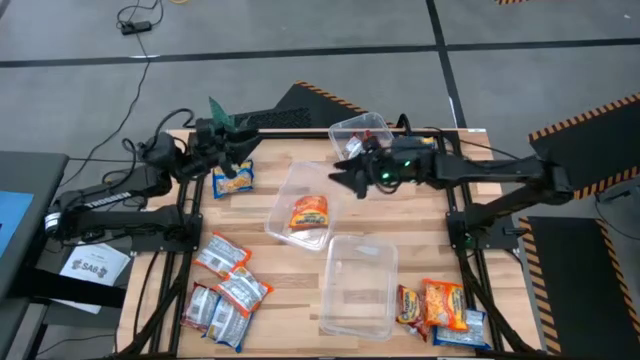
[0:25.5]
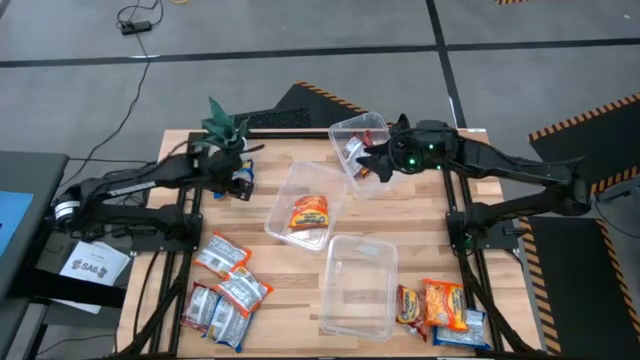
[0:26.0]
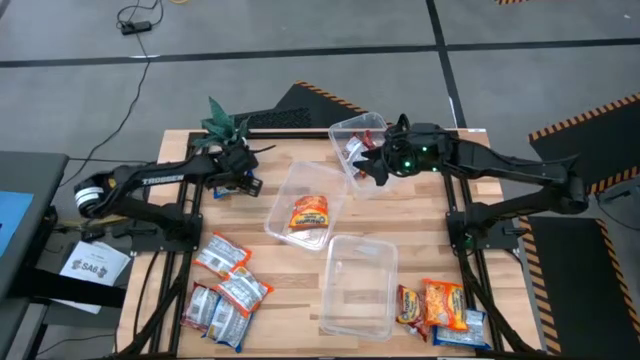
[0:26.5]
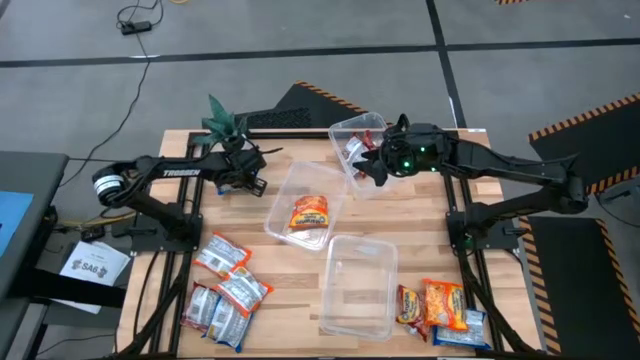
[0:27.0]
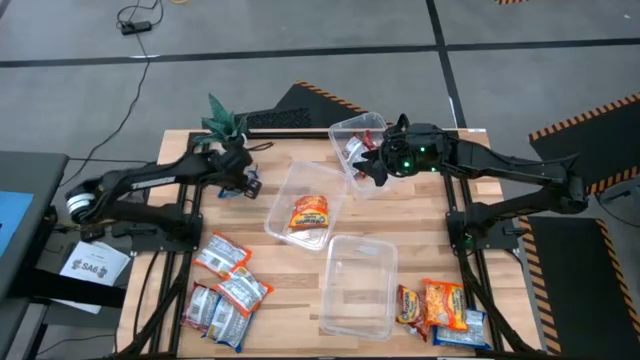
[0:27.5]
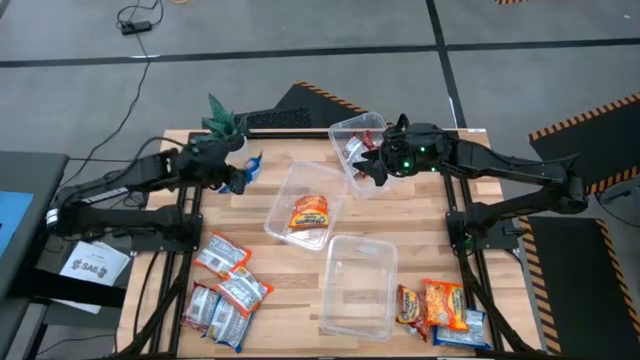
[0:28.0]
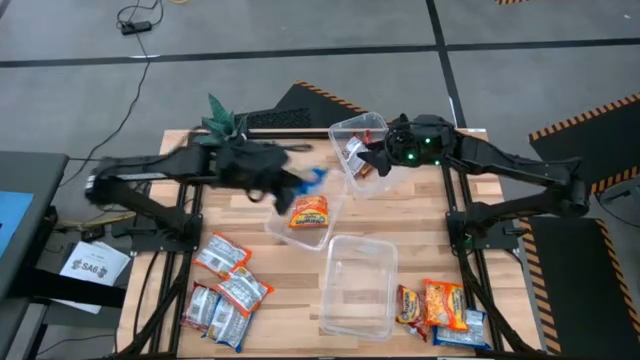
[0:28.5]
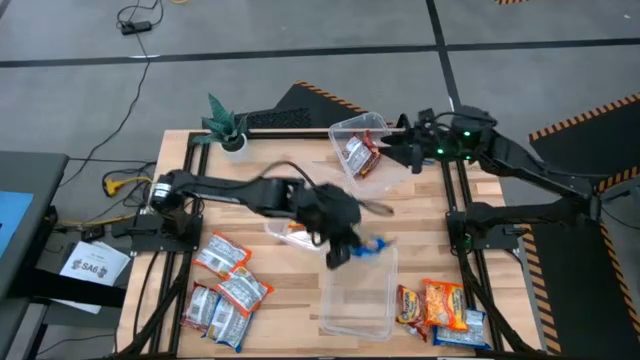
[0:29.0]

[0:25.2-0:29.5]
Task: Sort Maruchan noodles
Put the blue noodle pack into the bottom transparent bin

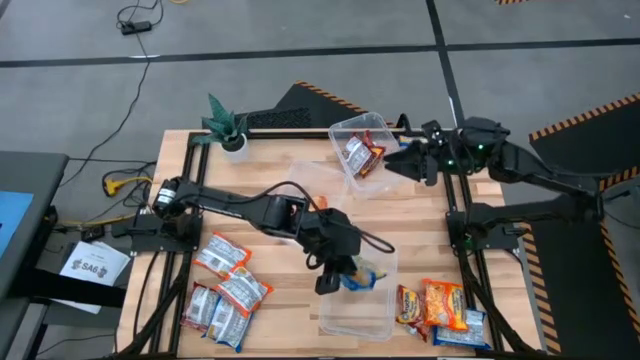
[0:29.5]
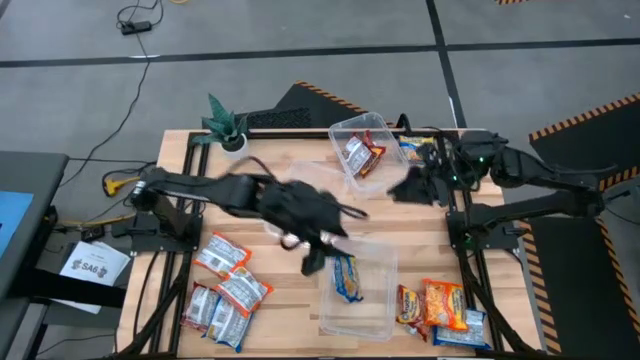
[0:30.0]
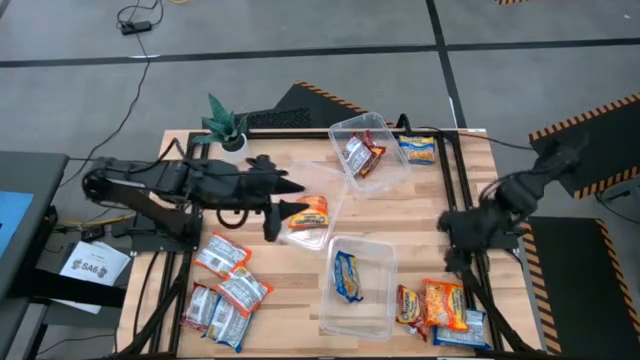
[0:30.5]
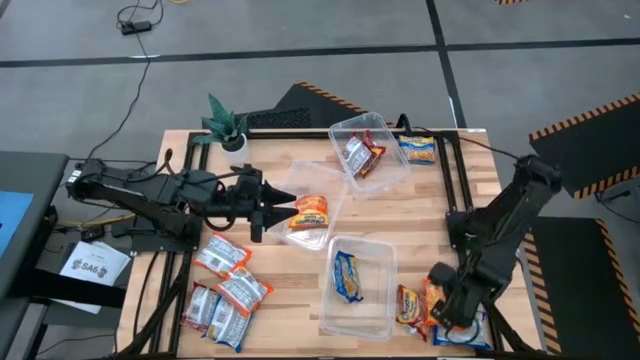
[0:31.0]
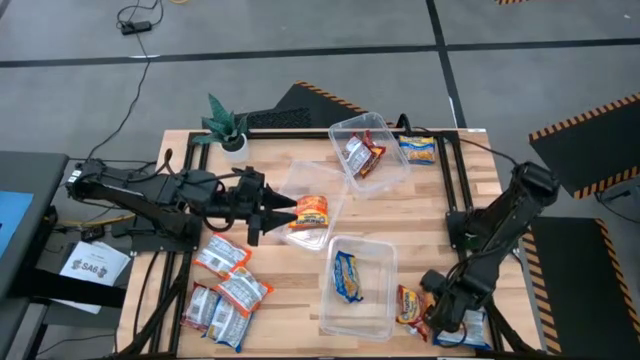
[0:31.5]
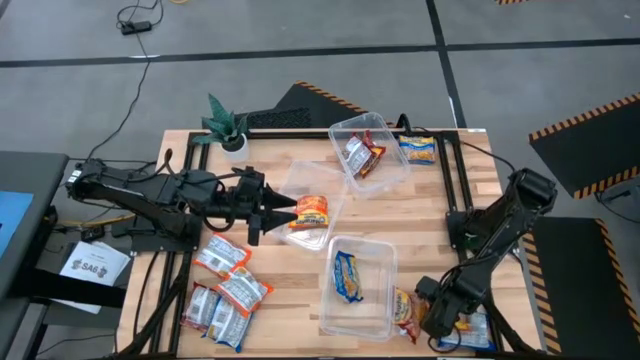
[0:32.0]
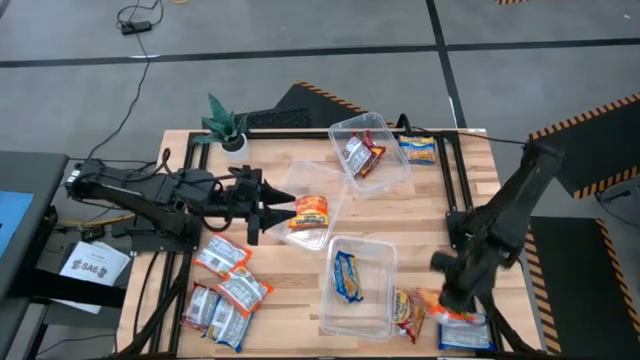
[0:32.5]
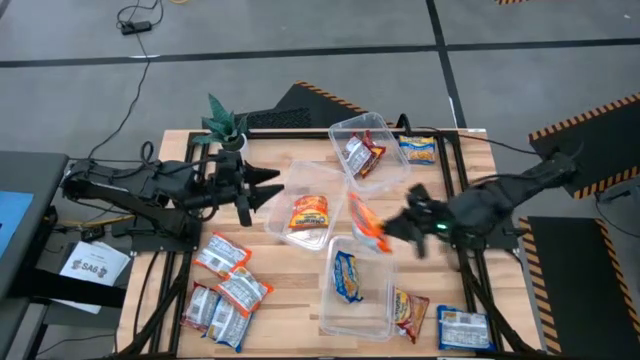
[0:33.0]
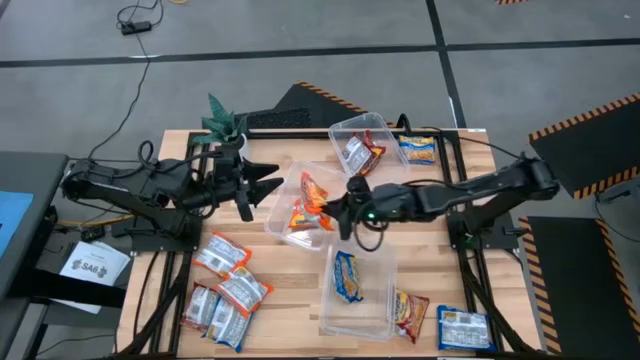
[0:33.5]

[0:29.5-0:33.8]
Put the orange noodle pack into the middle transparent bin

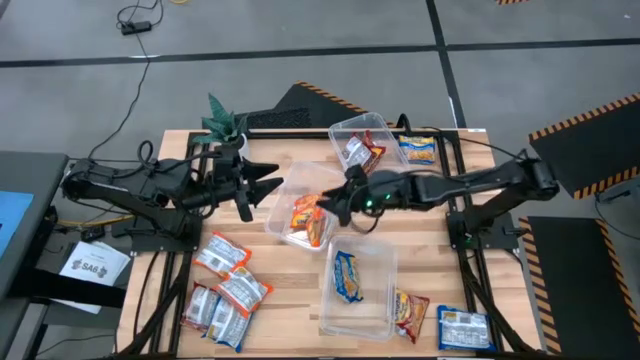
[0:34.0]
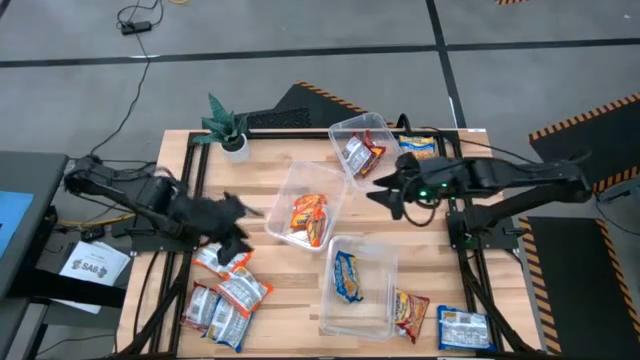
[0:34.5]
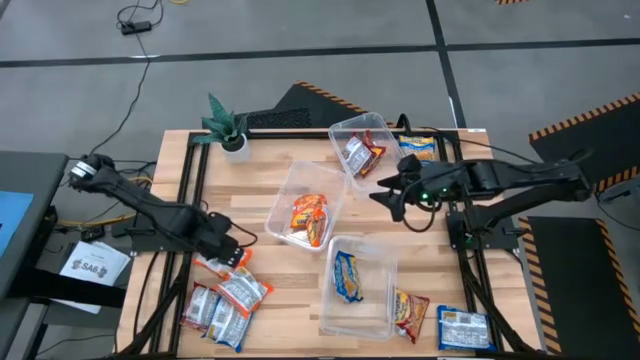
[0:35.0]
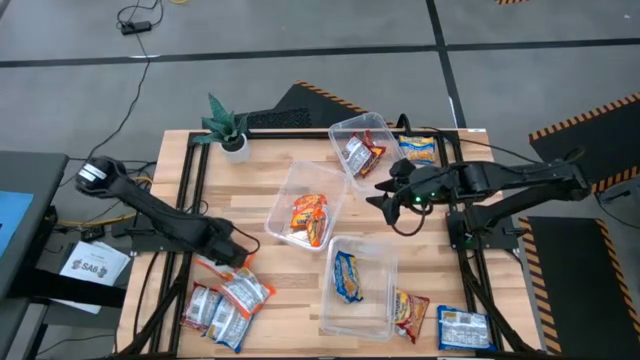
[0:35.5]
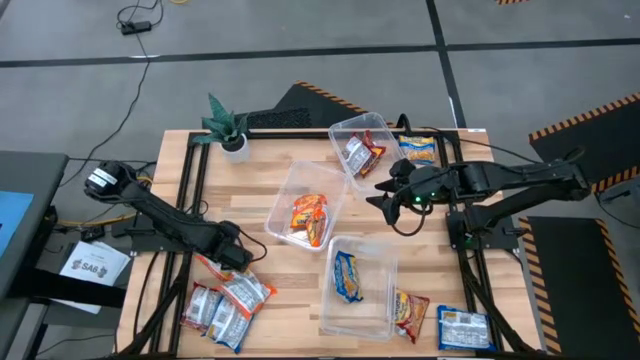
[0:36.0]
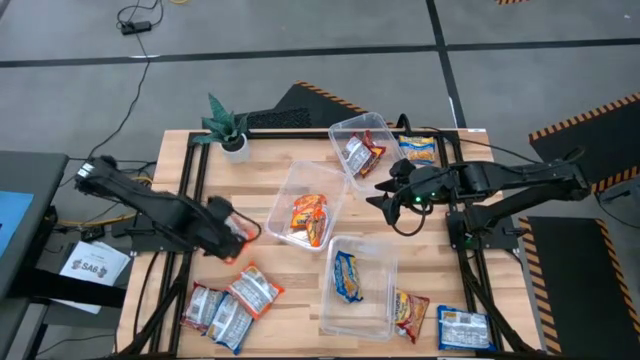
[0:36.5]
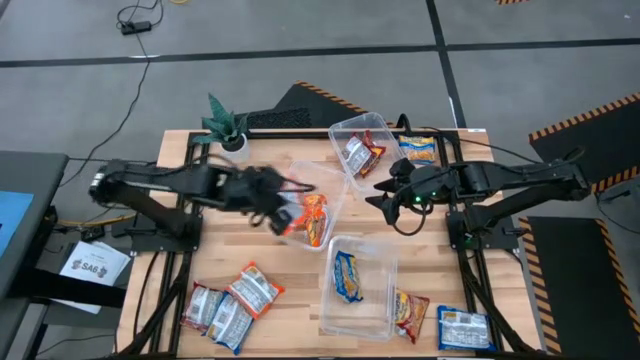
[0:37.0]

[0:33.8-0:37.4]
Put the orange noodle pack into the middle transparent bin

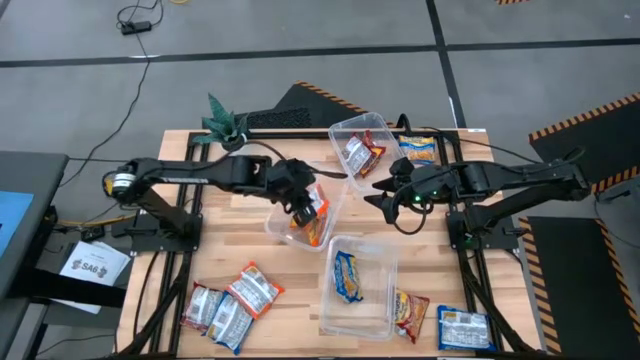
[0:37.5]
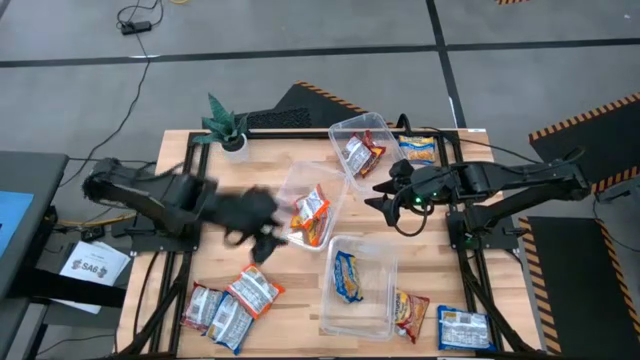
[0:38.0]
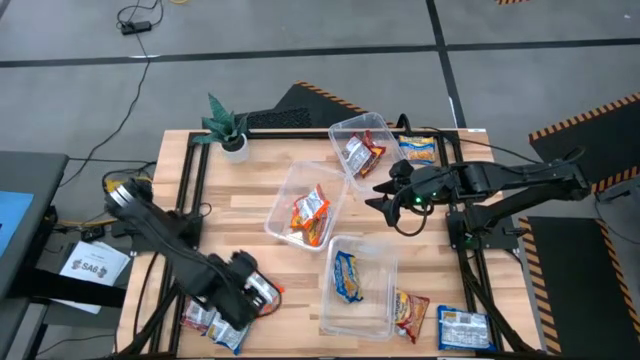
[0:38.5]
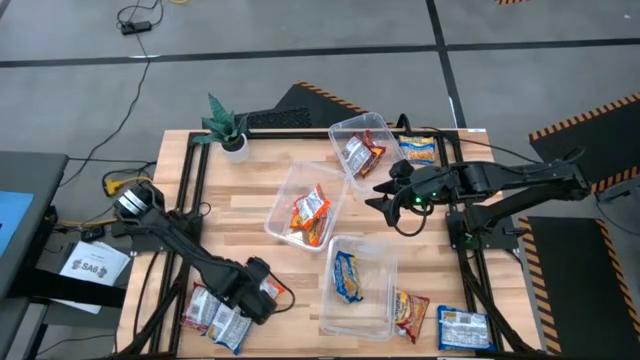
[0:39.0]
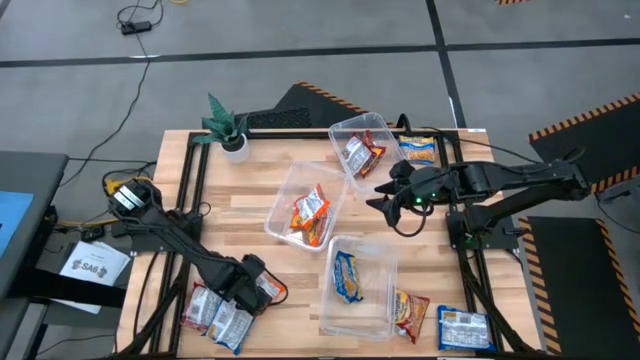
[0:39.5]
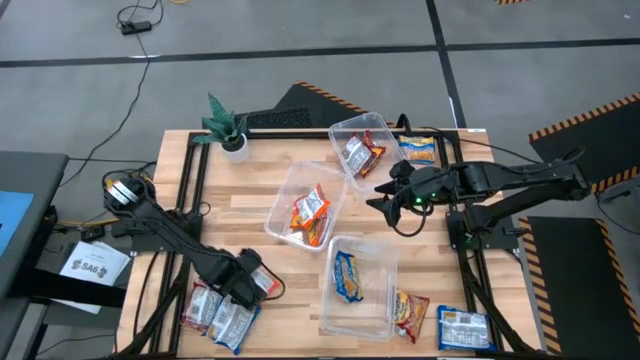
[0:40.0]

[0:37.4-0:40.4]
Put the orange noodle pack into the middle transparent bin

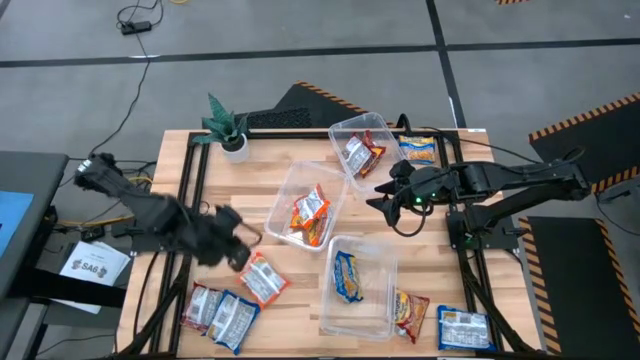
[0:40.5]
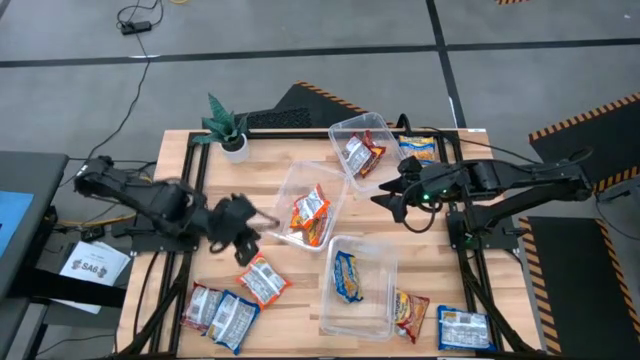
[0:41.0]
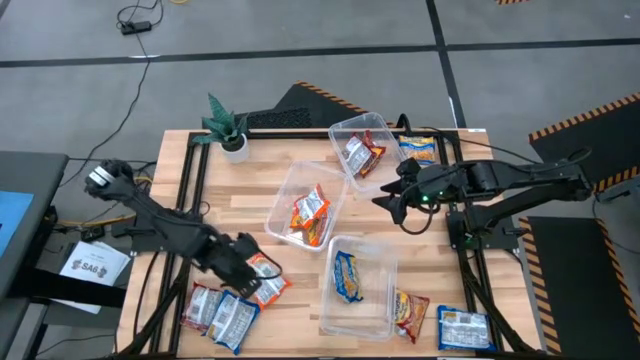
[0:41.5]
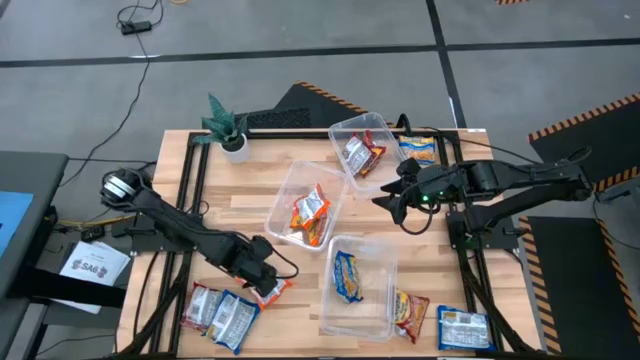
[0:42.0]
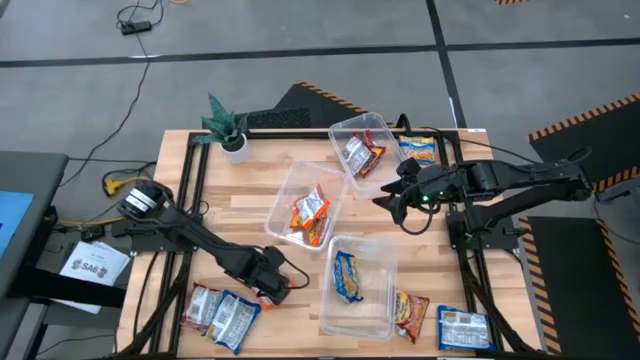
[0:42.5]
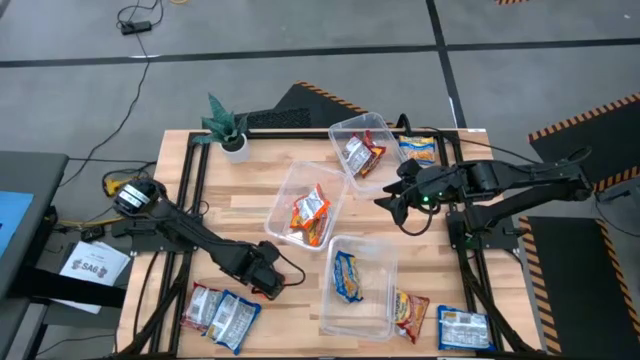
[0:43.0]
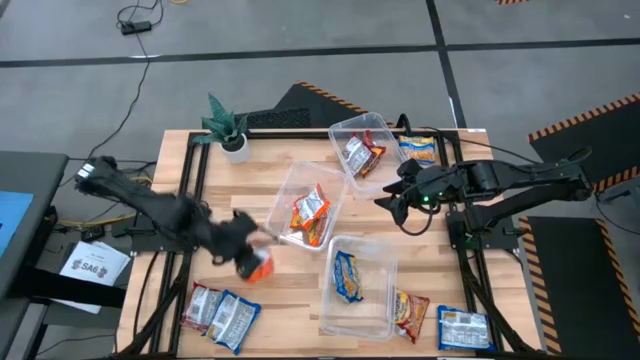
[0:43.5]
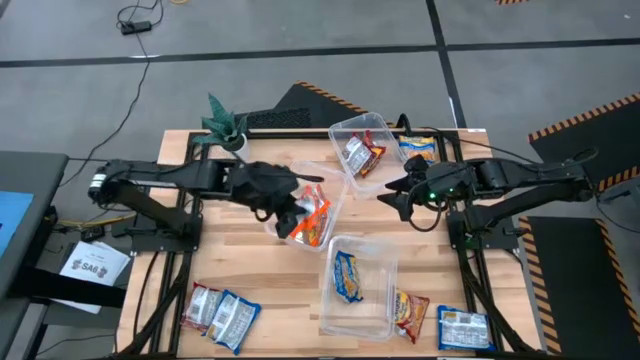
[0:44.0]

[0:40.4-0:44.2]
Put the orange noodle pack into the middle transparent bin

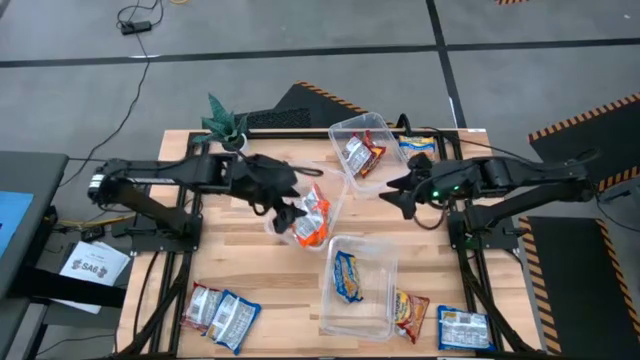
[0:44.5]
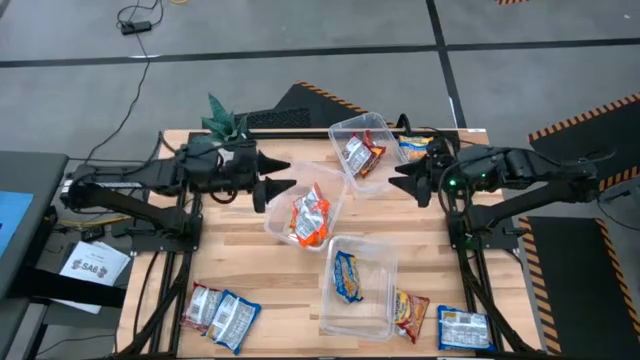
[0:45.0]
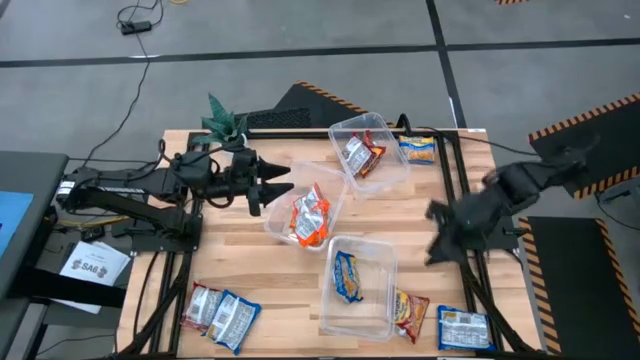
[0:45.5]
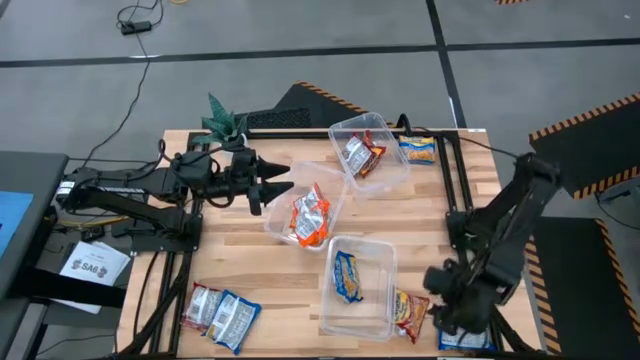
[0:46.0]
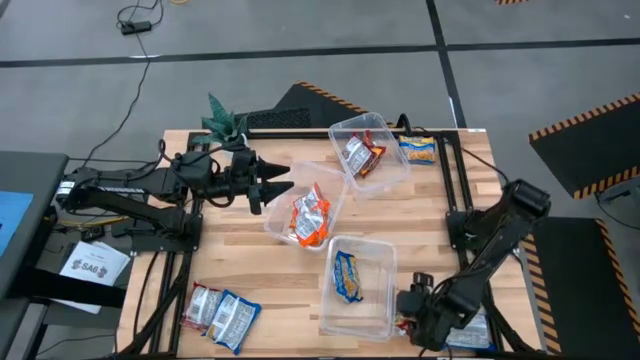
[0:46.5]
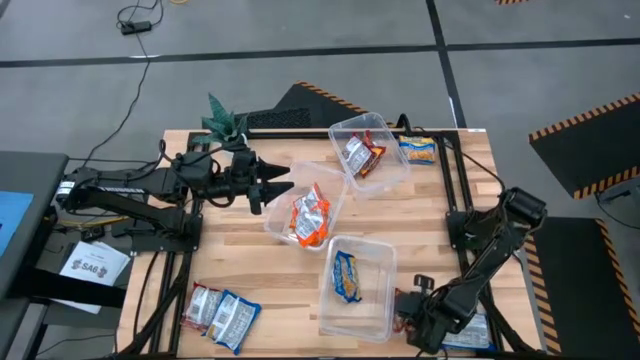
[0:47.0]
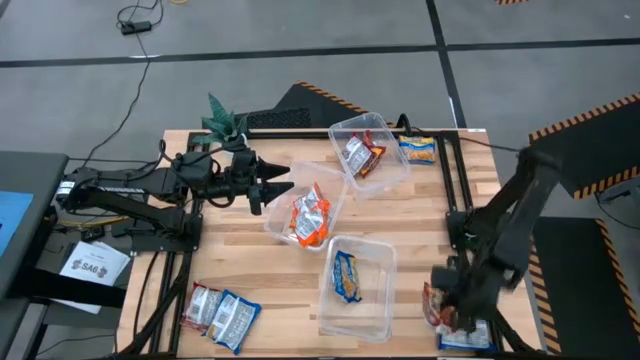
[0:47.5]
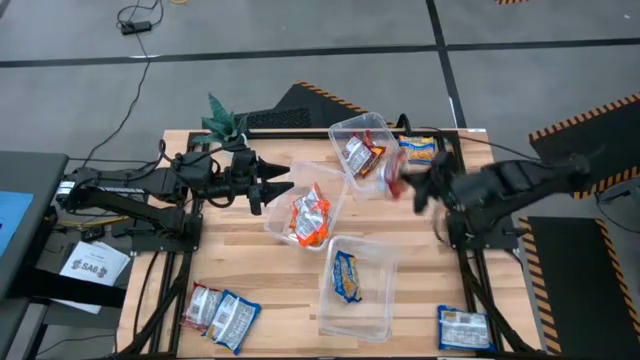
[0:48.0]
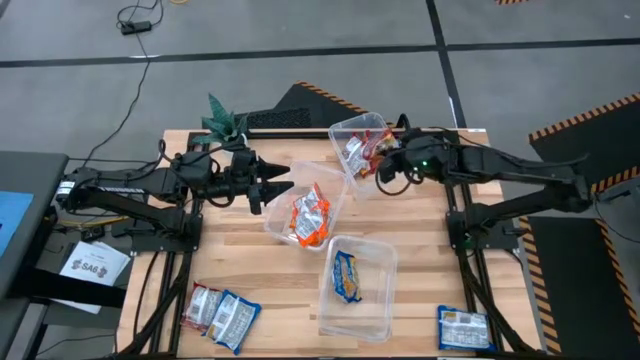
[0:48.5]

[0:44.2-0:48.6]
Put the red noodle pack into the top transparent bin
